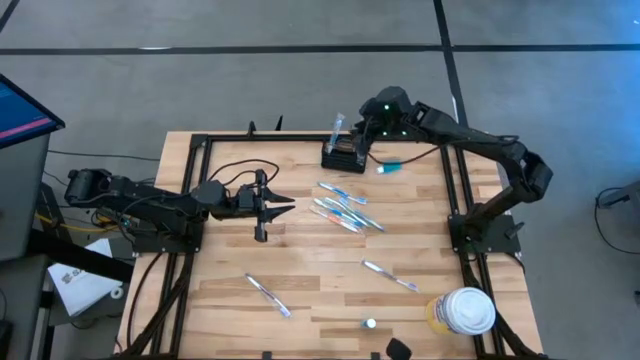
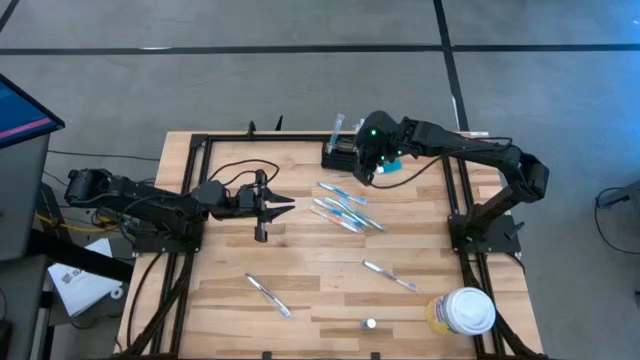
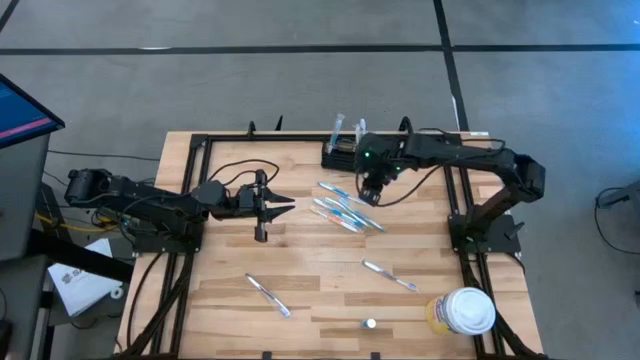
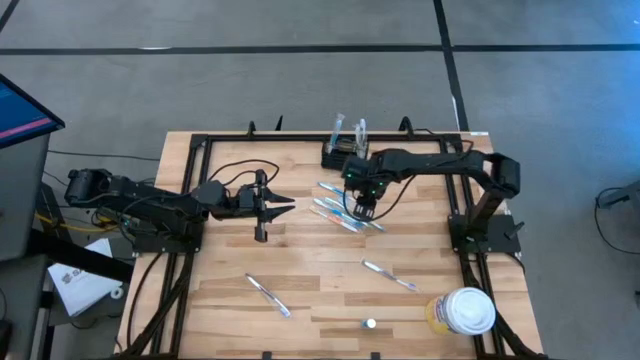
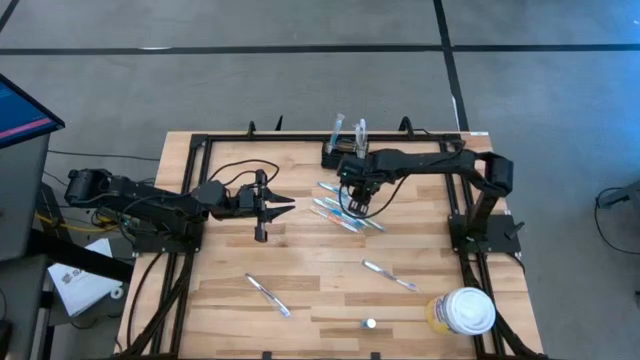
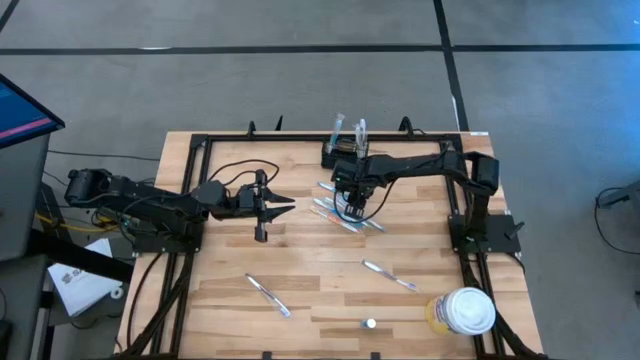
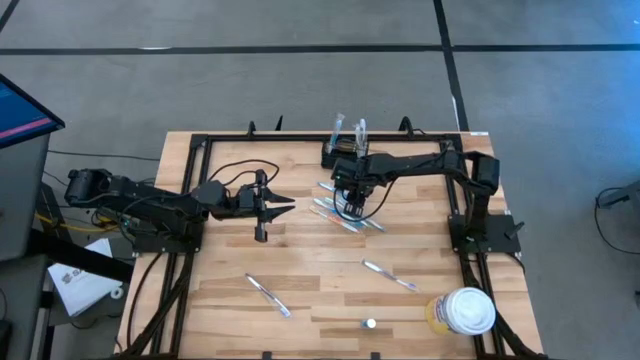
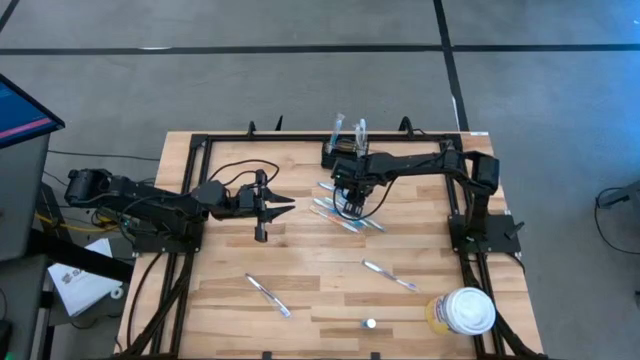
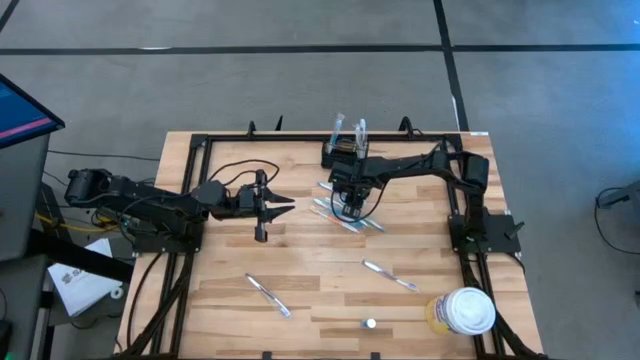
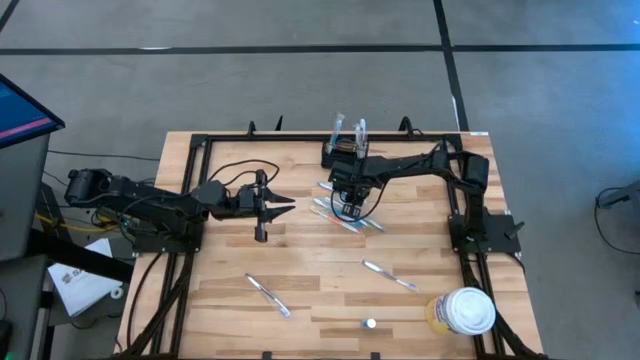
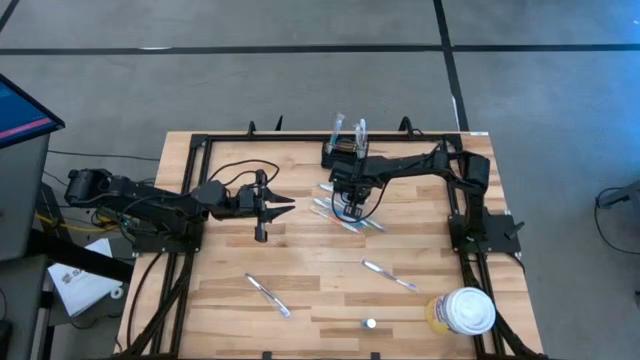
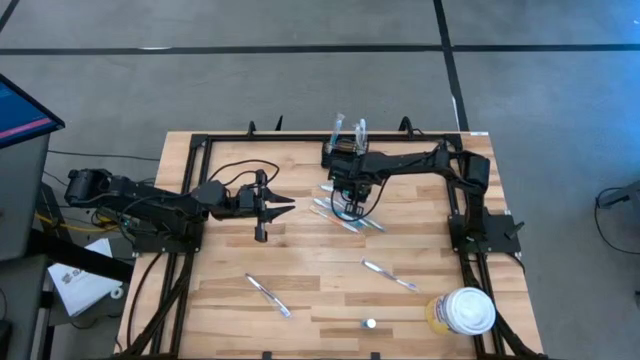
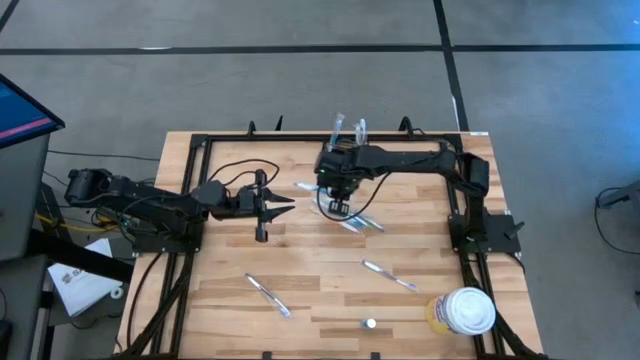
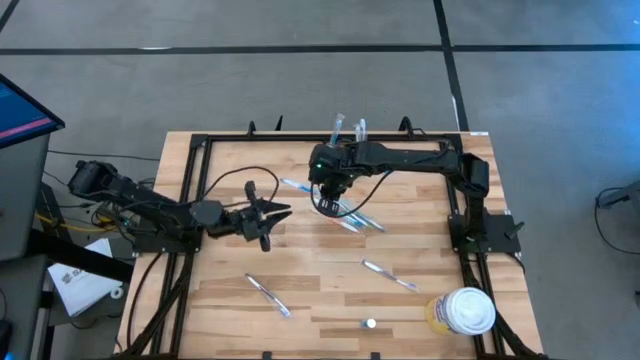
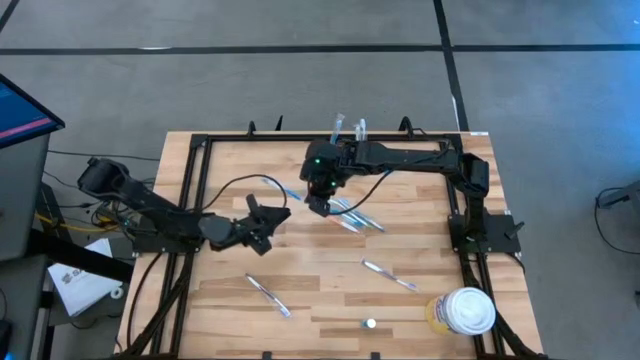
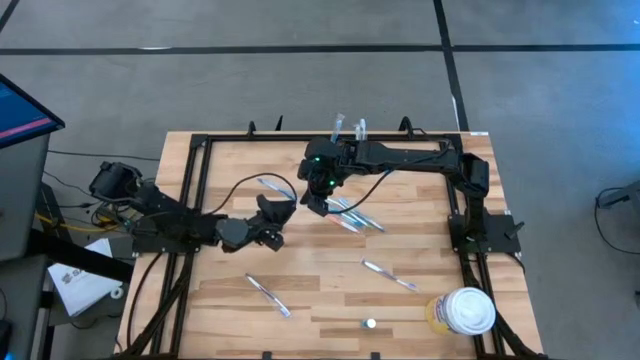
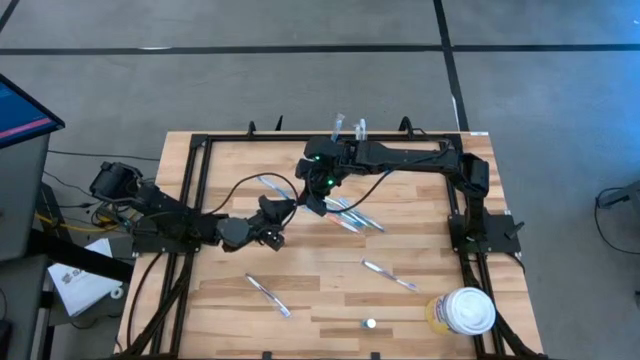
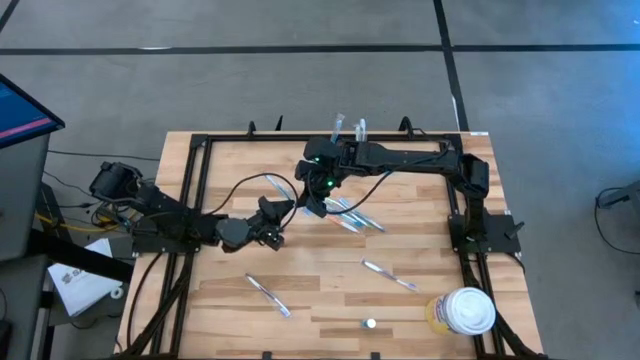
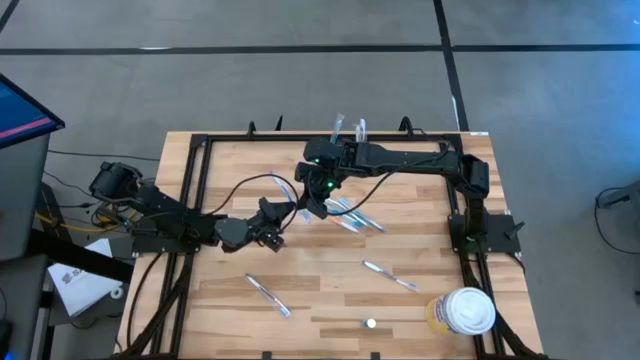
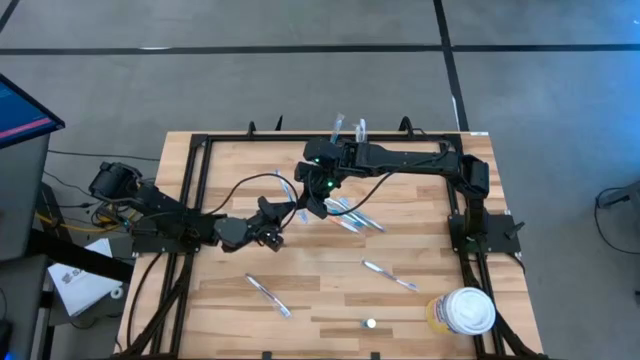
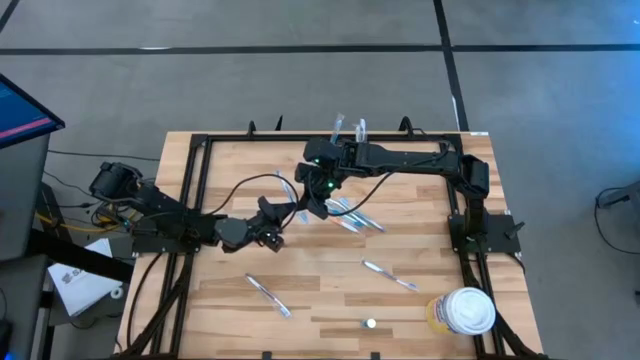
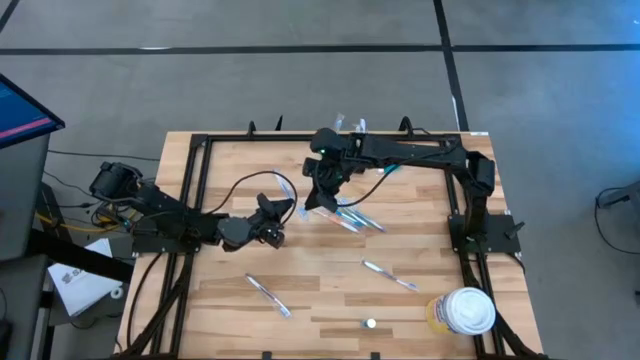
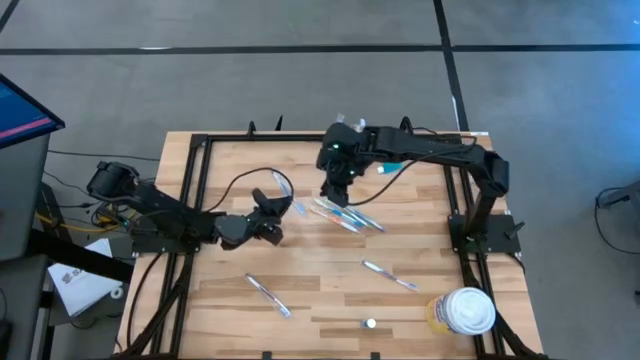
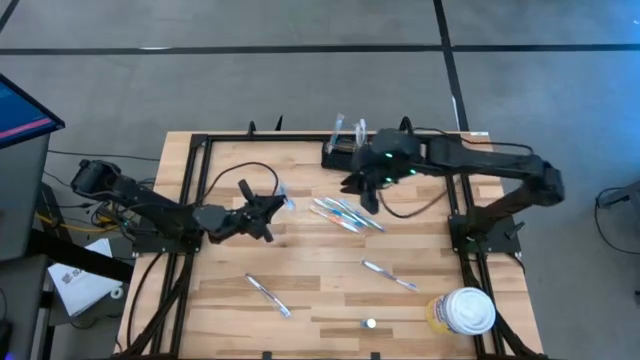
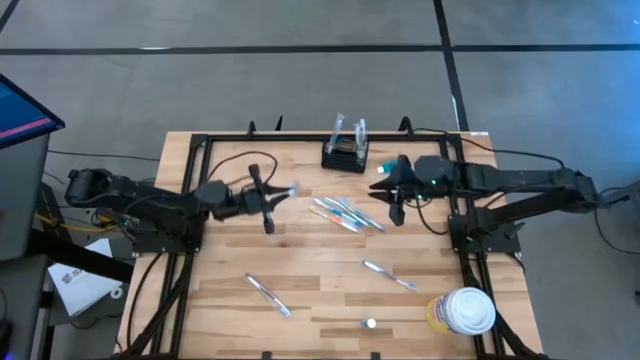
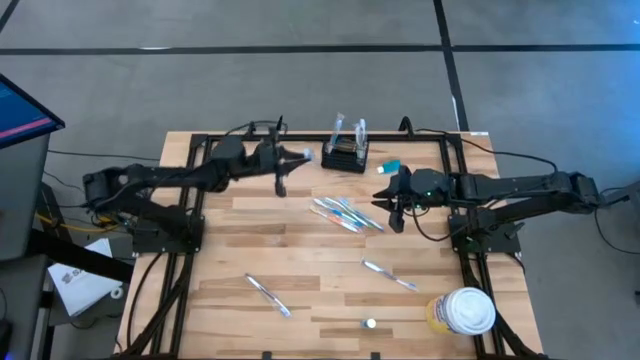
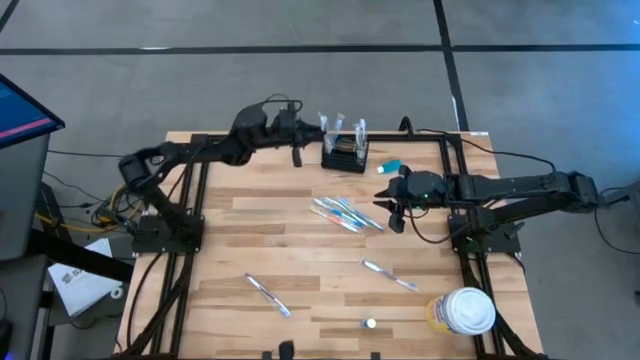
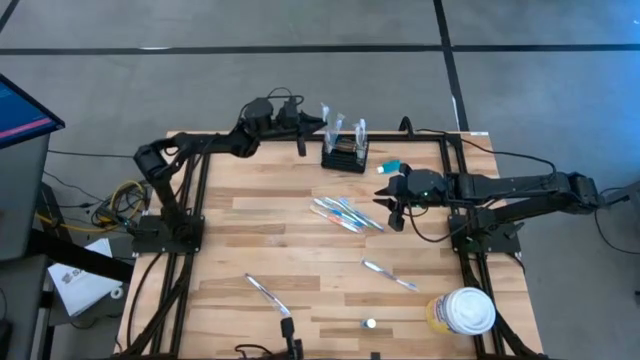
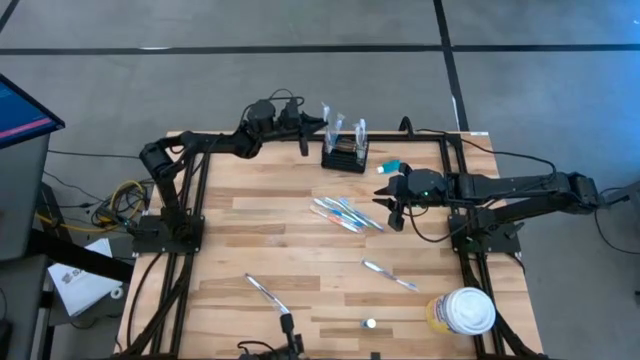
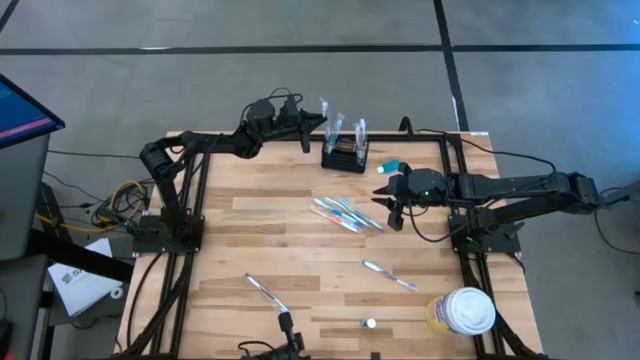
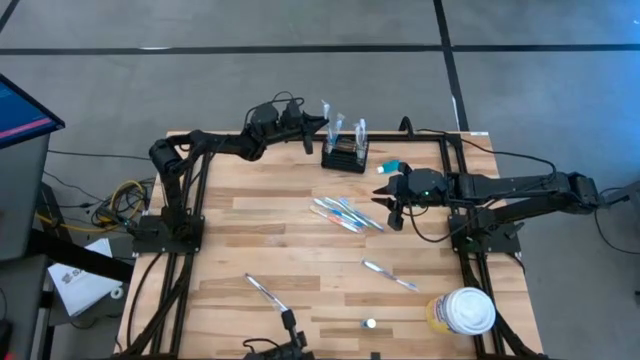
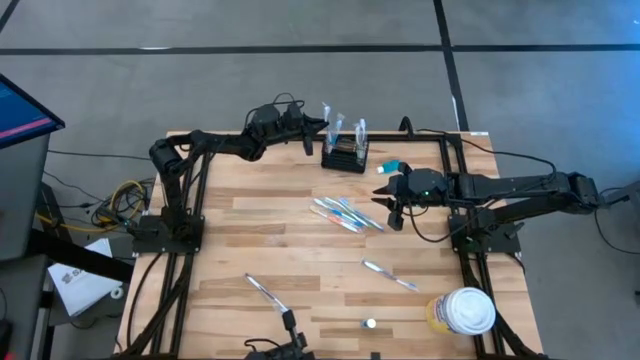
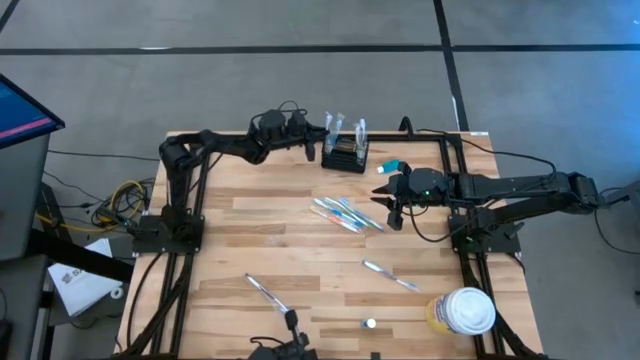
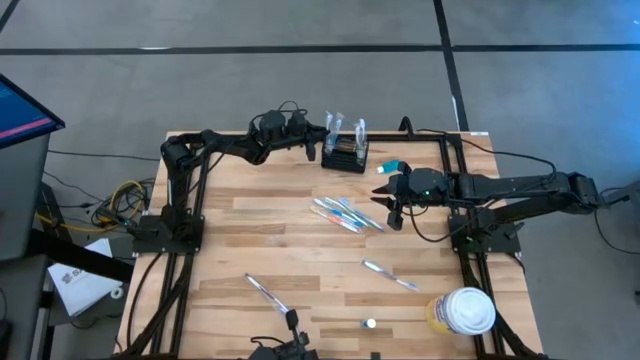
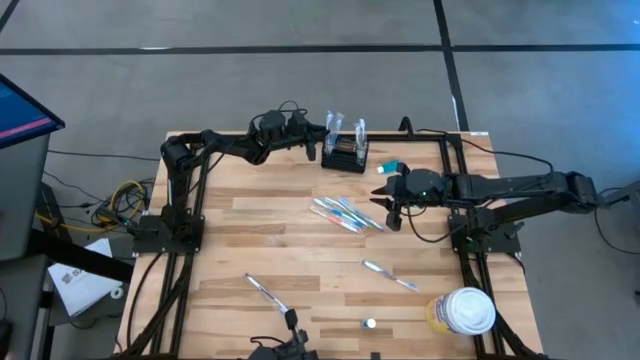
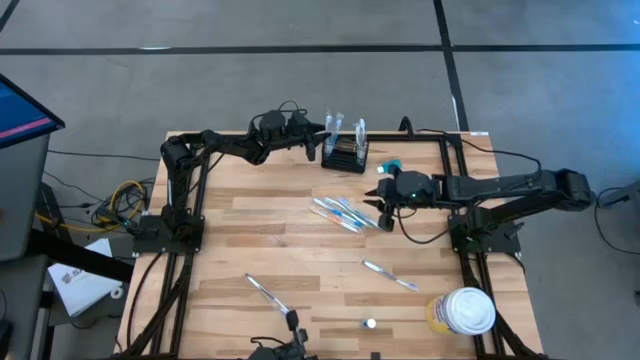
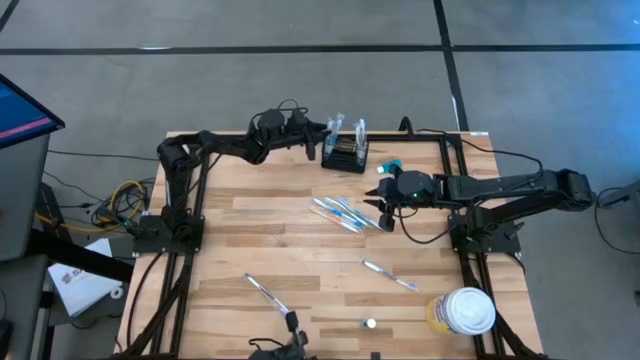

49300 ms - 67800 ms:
Task: Pick & Place toothbrushing station
Put the blue toothbrush into the mesh organizer
